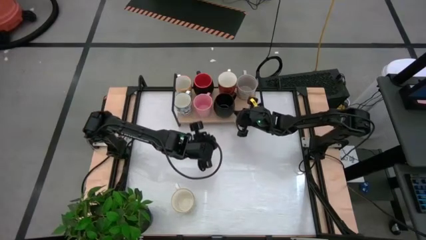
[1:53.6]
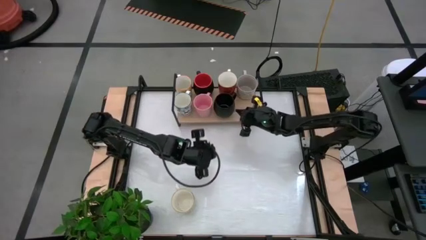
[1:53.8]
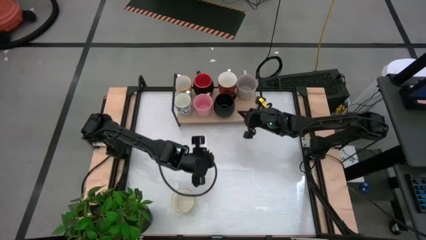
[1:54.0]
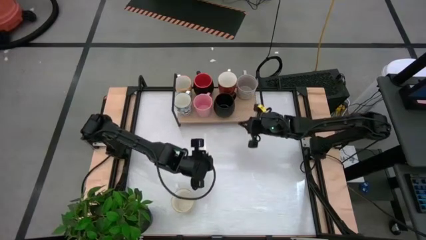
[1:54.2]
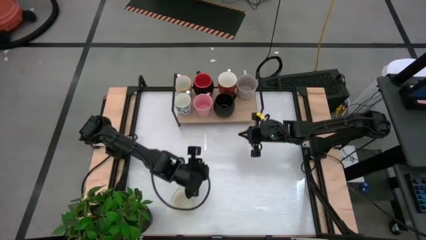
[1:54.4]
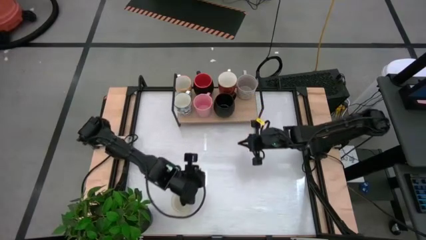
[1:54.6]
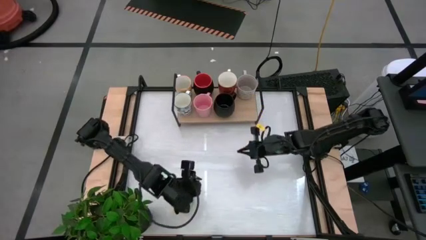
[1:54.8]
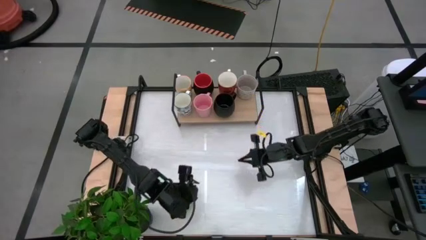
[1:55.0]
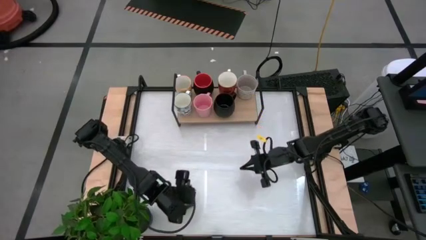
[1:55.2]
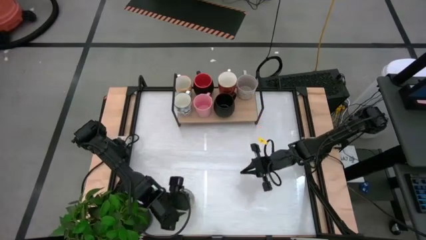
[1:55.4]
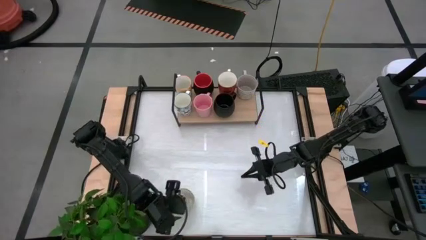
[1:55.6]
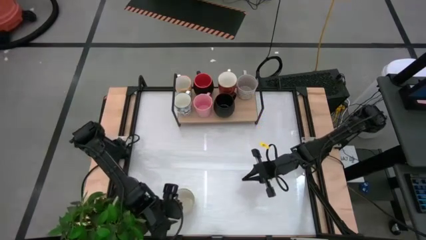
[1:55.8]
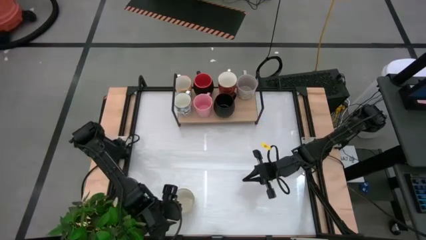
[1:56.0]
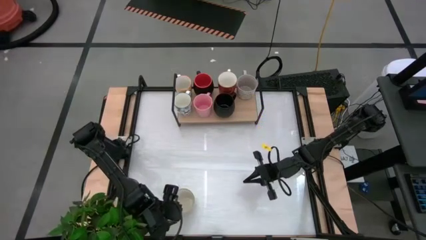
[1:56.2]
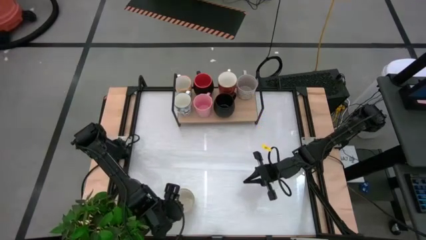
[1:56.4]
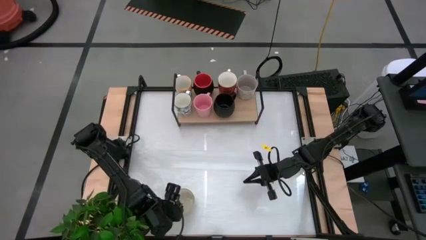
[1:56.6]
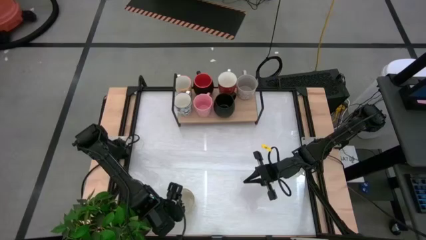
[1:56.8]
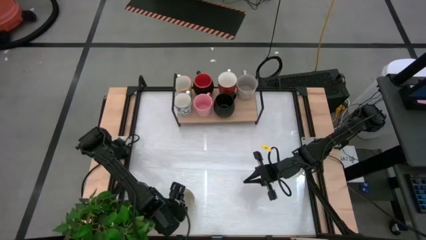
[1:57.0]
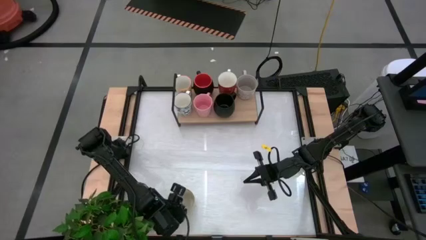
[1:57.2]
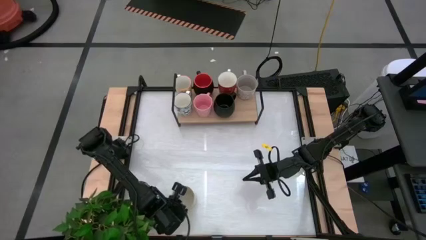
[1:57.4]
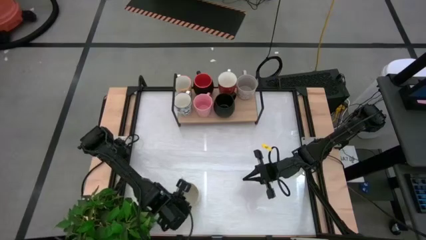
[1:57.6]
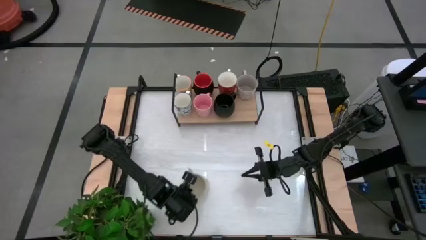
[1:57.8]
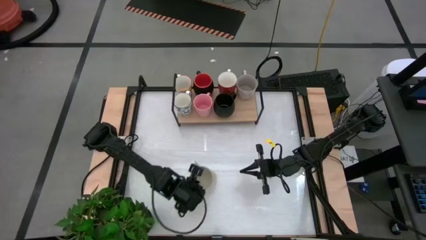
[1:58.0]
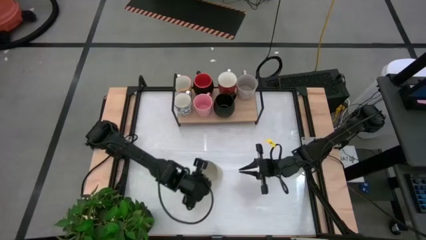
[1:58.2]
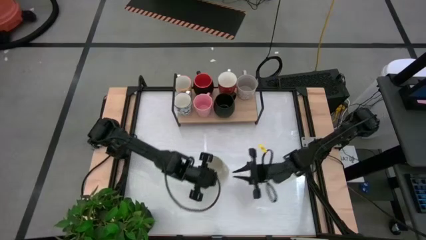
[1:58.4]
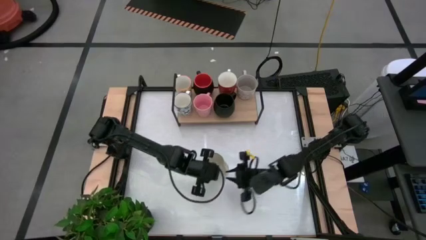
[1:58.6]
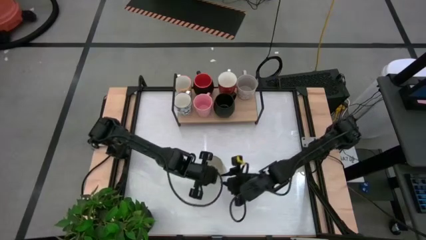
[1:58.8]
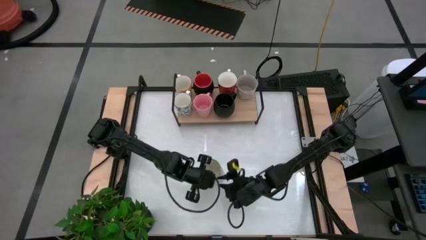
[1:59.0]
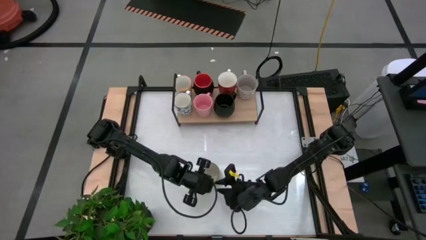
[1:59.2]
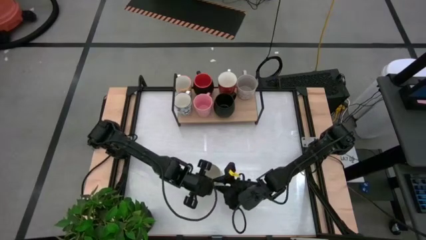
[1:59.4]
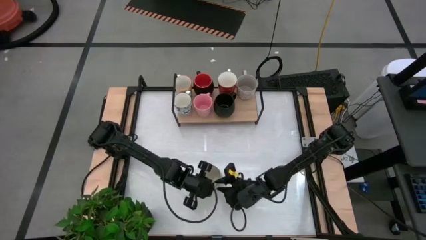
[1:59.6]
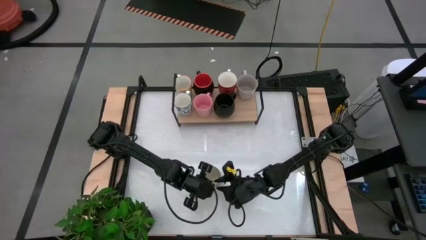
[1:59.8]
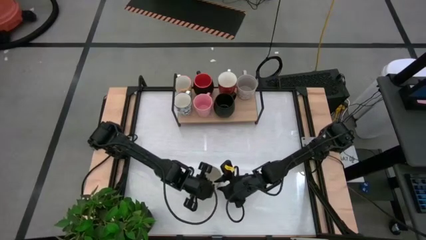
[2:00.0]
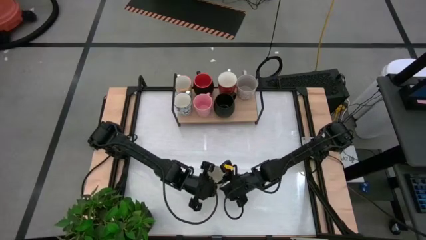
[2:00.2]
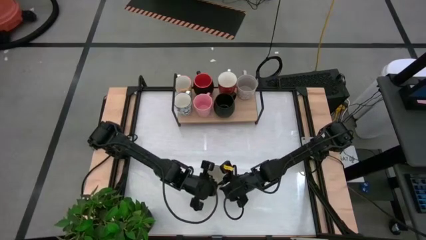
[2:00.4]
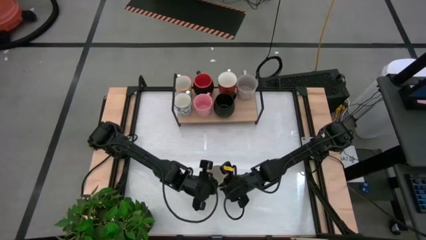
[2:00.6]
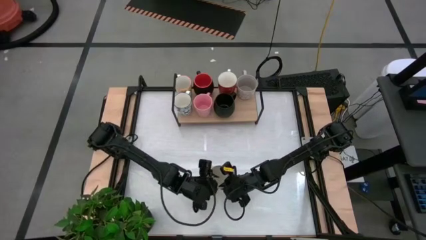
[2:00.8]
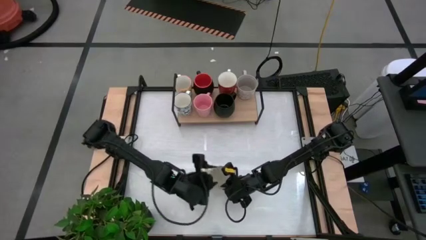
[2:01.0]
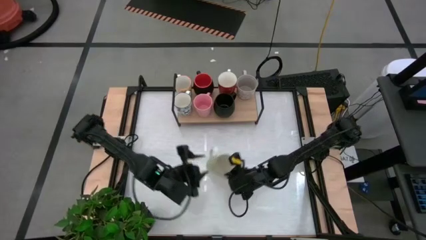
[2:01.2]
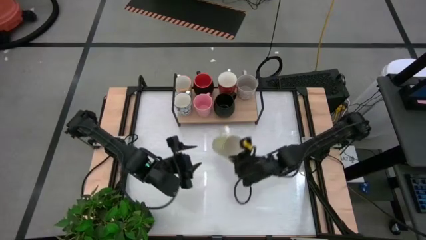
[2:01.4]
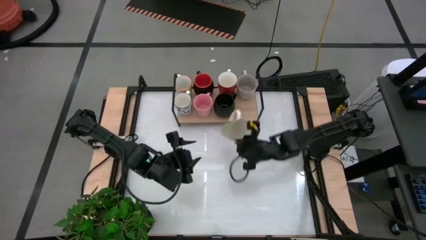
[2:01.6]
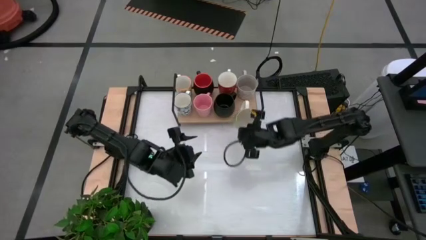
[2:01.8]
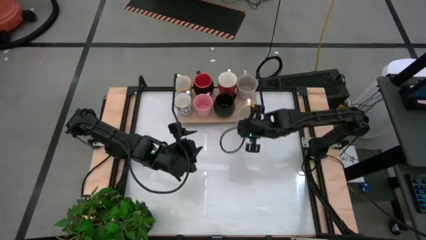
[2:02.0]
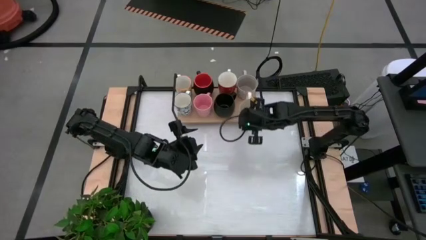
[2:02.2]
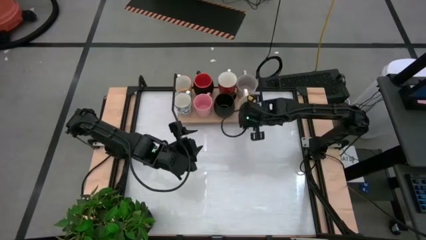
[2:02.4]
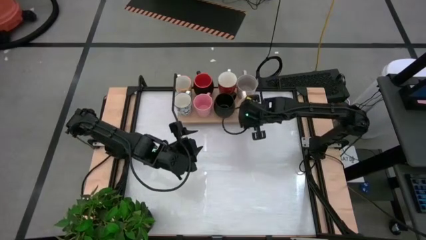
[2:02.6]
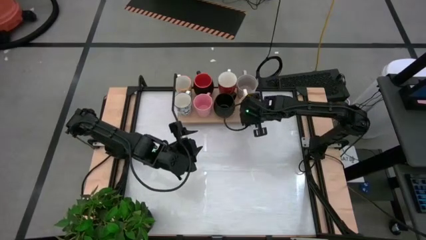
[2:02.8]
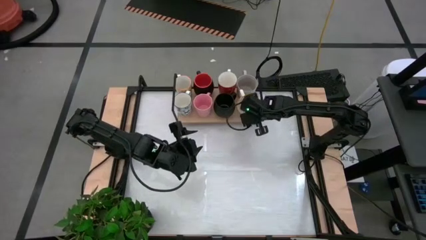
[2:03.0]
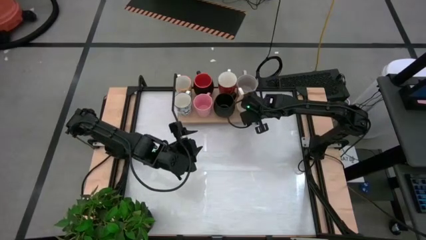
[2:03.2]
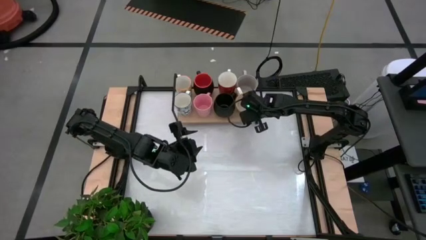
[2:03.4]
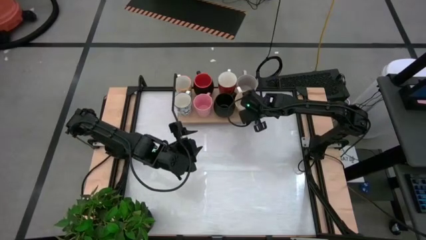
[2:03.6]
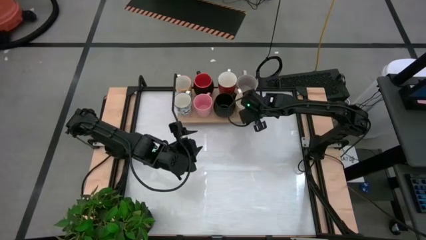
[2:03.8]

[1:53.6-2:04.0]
Task: Place coffee mugs
Put the green mug on the shelf

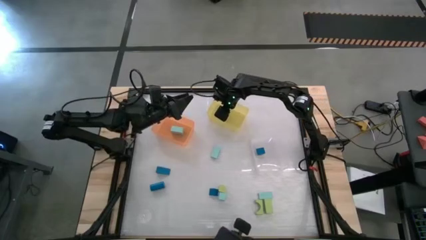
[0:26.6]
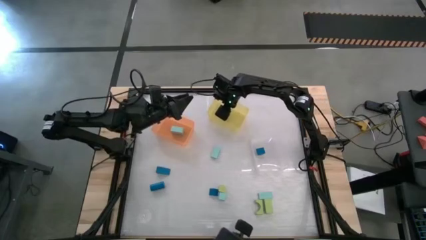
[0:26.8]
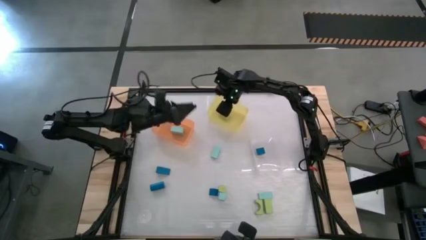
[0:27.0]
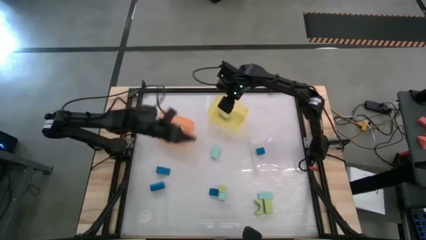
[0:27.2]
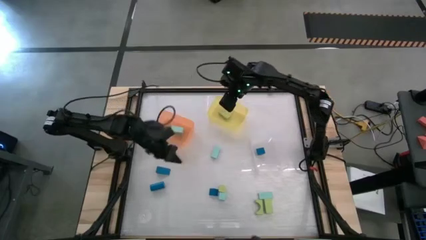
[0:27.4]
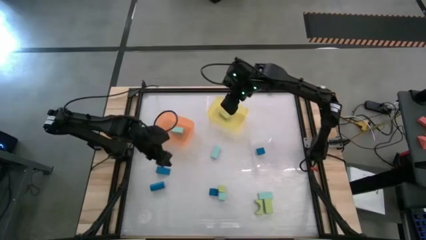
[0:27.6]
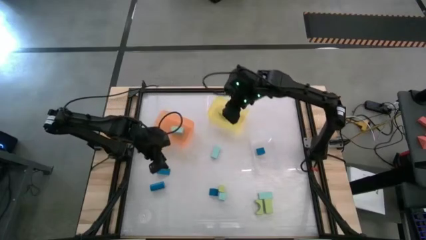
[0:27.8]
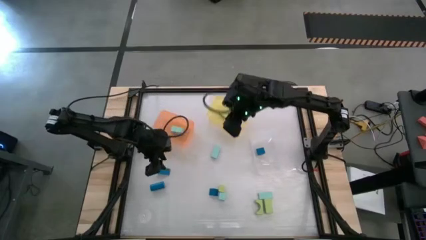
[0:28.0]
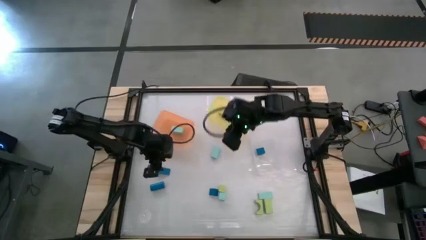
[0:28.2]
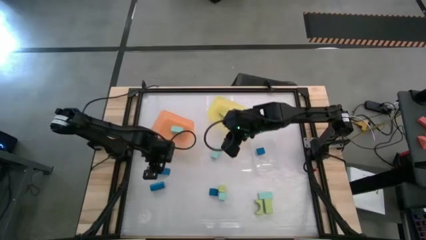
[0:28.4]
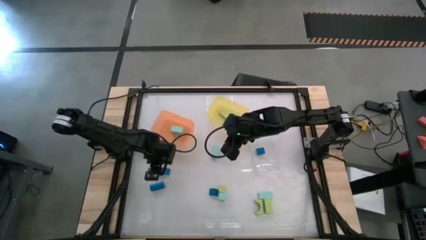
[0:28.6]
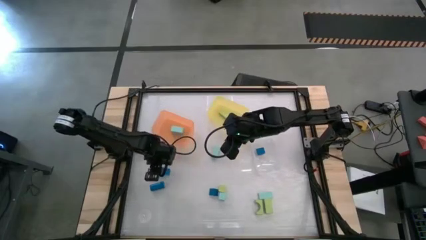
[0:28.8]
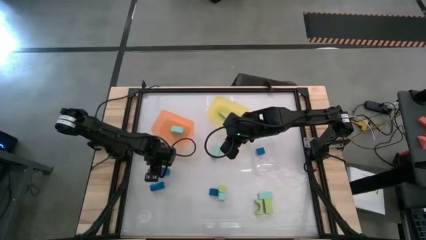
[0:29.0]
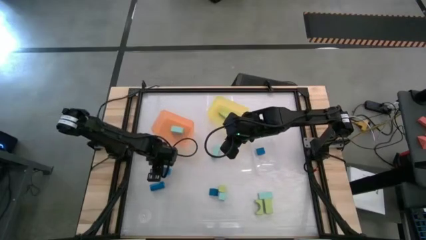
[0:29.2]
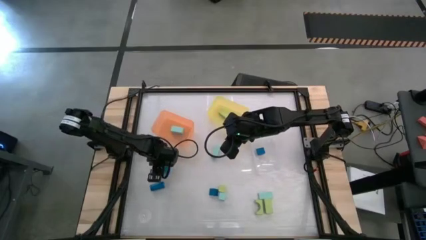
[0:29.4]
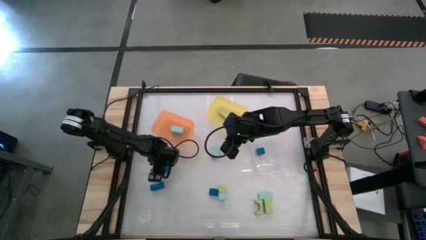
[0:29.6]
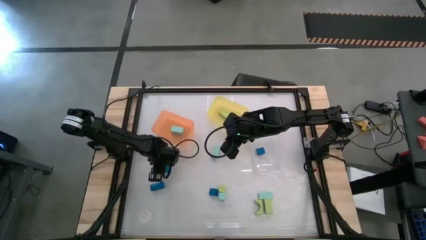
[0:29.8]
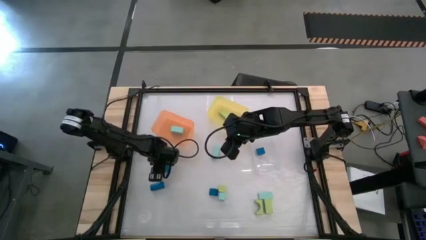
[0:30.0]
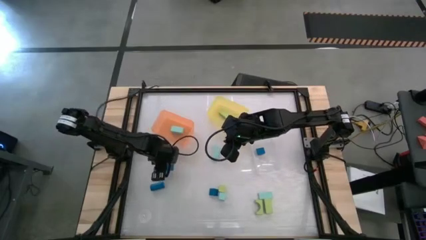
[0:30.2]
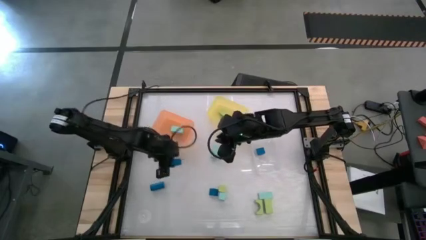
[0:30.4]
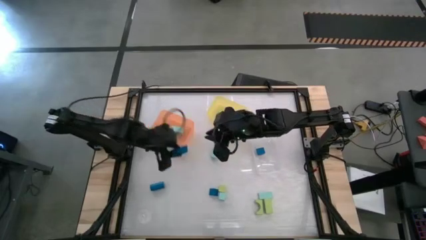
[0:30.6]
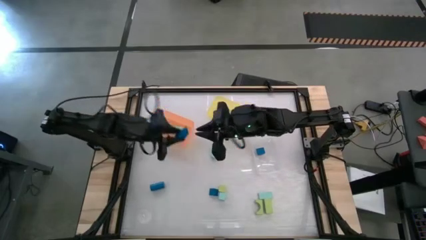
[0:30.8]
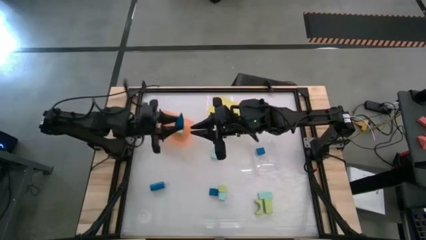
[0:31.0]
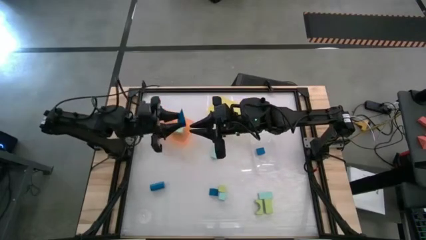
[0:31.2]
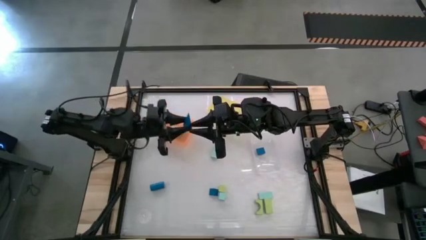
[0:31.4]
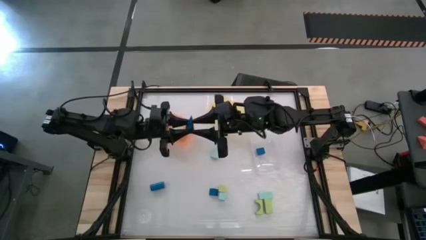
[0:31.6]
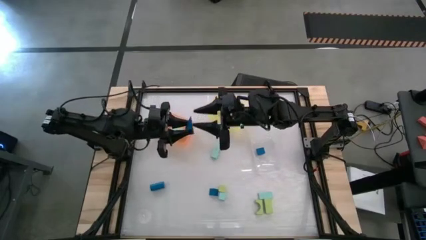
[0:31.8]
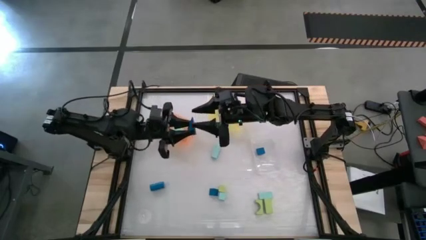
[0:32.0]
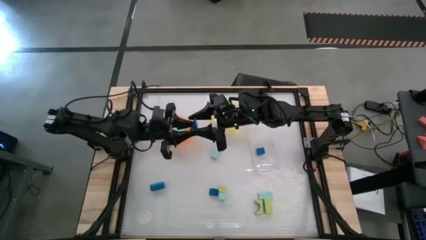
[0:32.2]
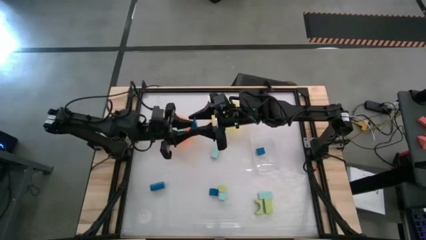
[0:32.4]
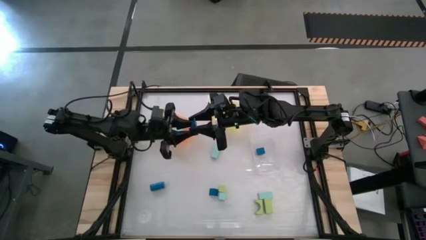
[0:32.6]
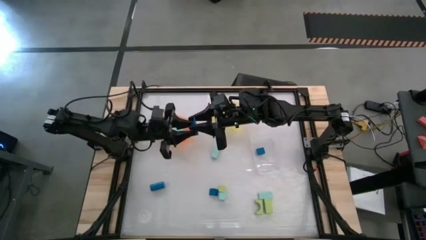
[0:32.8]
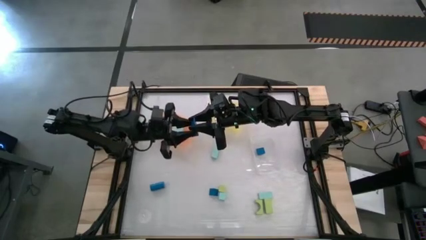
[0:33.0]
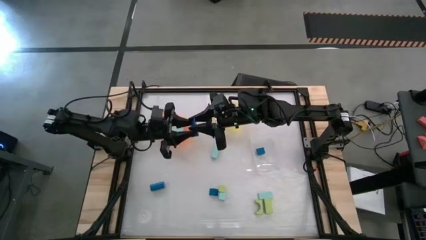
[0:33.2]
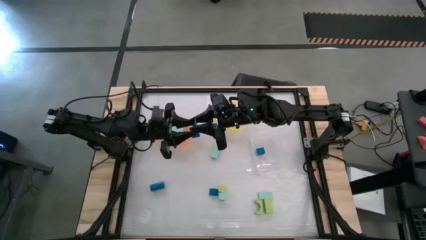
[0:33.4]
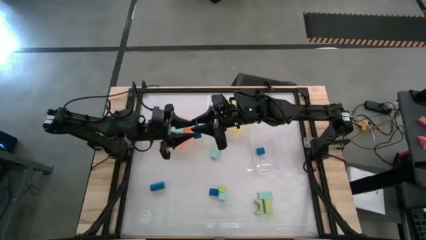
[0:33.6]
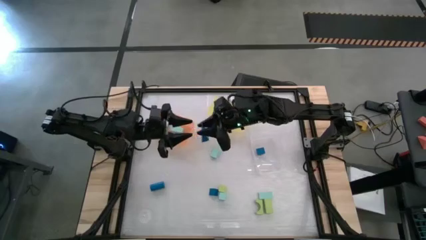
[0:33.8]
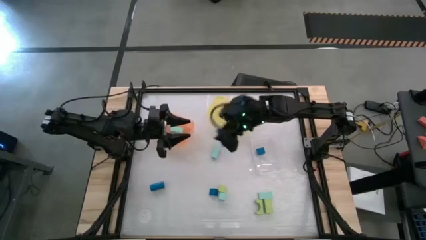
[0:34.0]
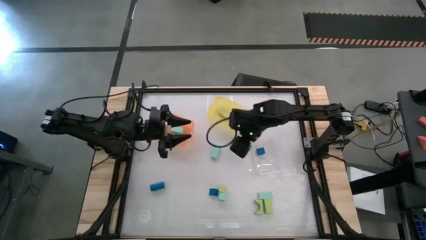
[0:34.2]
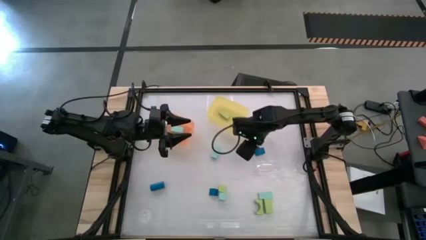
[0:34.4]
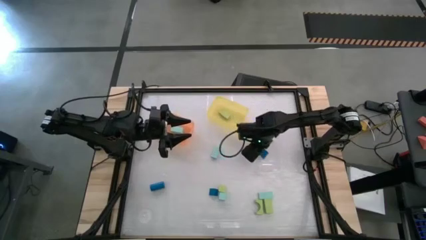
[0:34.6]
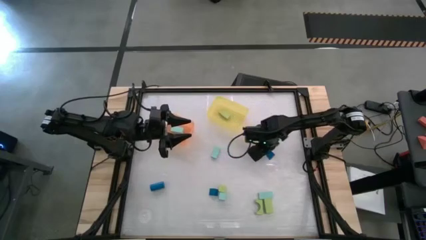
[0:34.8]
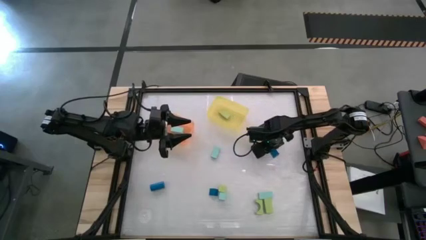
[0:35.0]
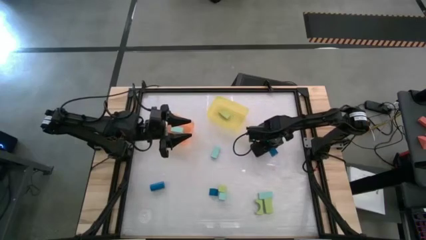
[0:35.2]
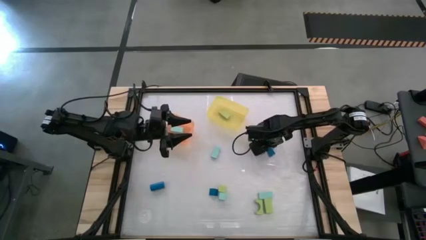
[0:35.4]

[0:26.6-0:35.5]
Task: Sort & place blocks by color
Put the blue block into the transparent bin
